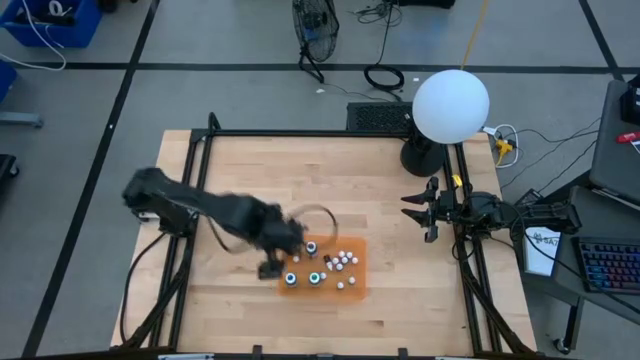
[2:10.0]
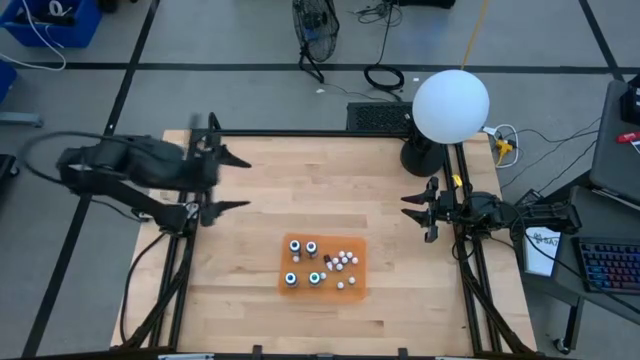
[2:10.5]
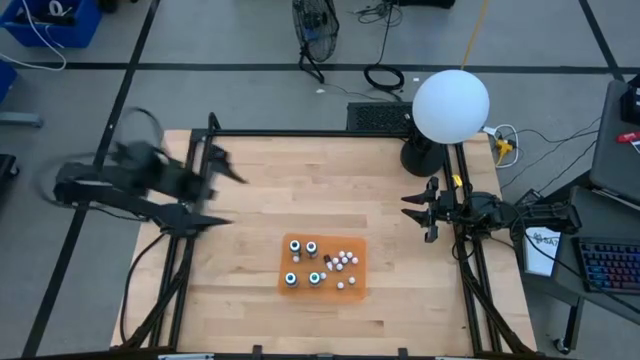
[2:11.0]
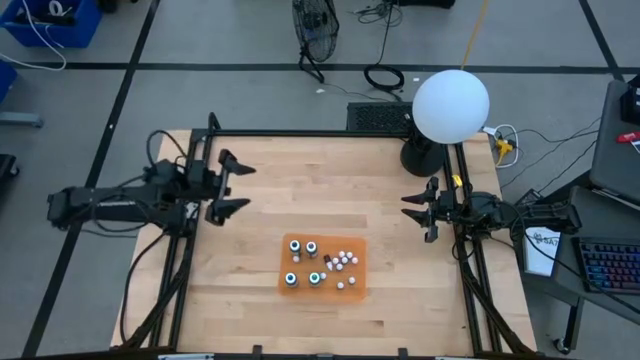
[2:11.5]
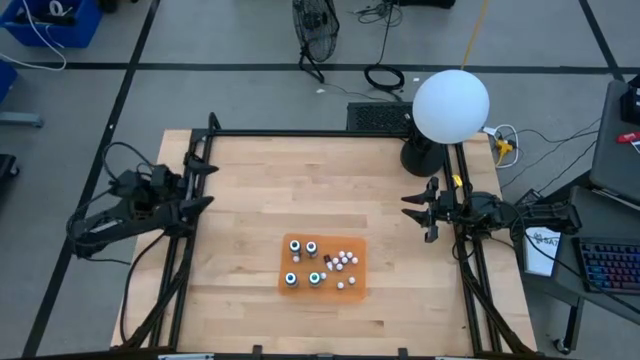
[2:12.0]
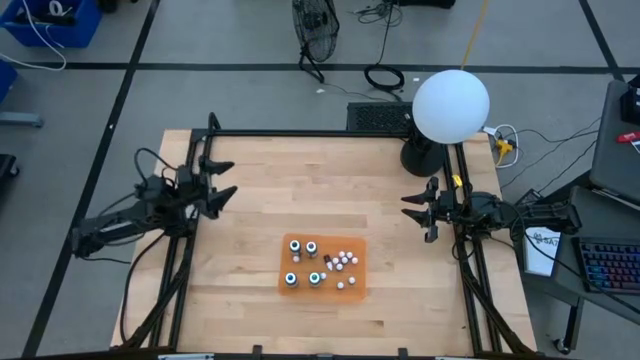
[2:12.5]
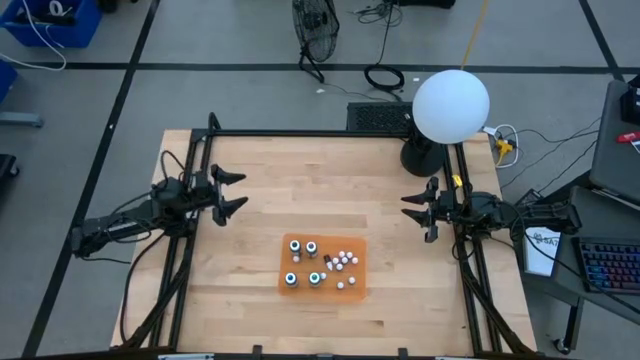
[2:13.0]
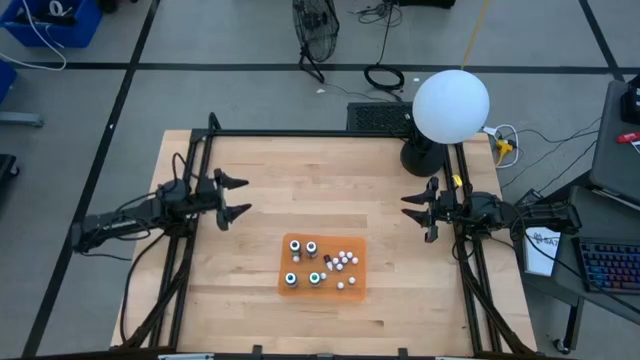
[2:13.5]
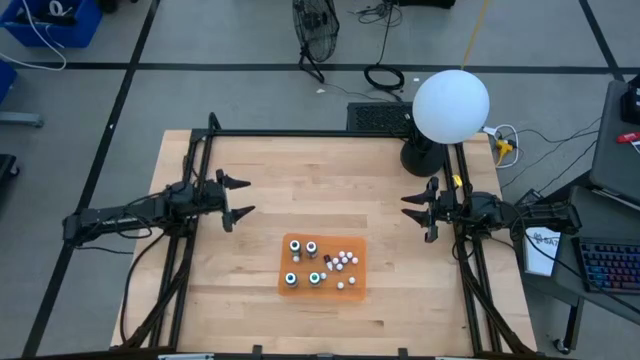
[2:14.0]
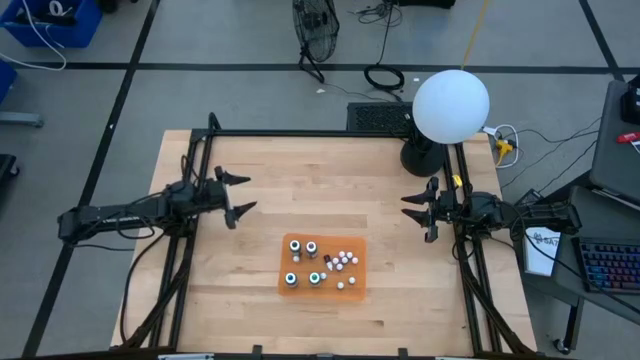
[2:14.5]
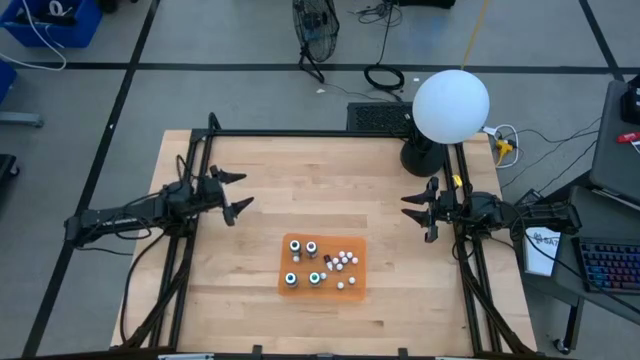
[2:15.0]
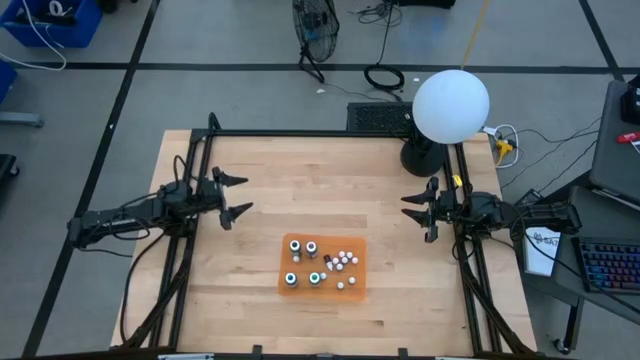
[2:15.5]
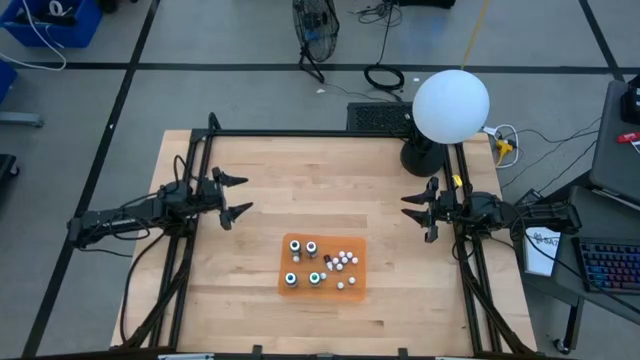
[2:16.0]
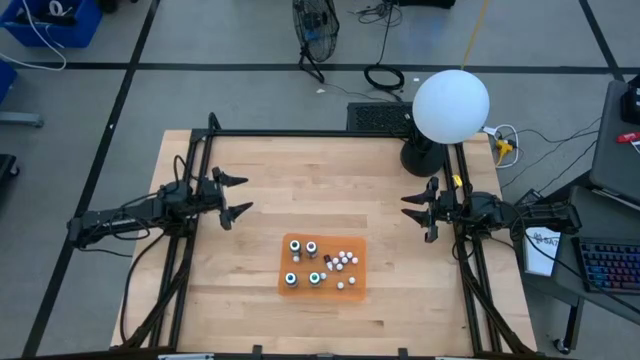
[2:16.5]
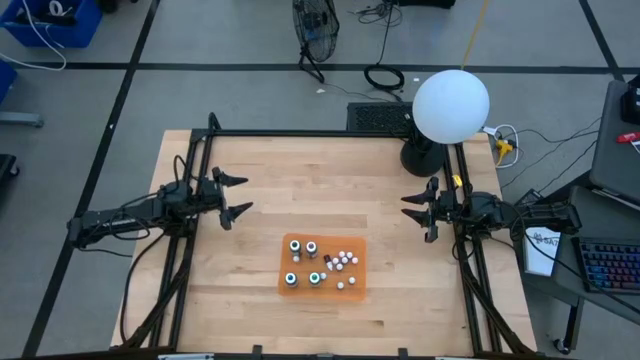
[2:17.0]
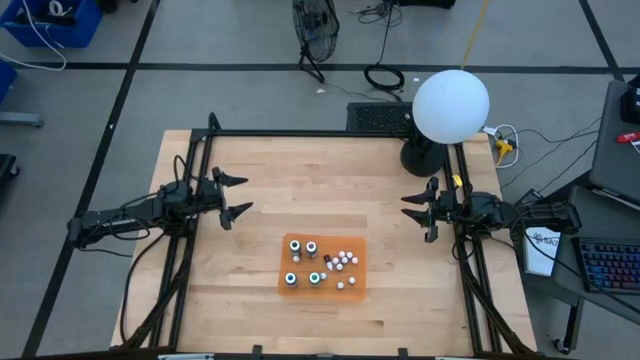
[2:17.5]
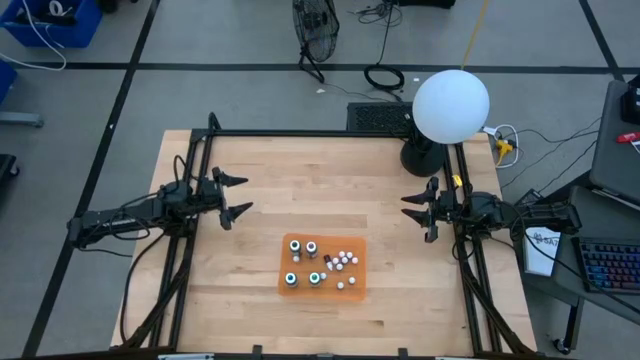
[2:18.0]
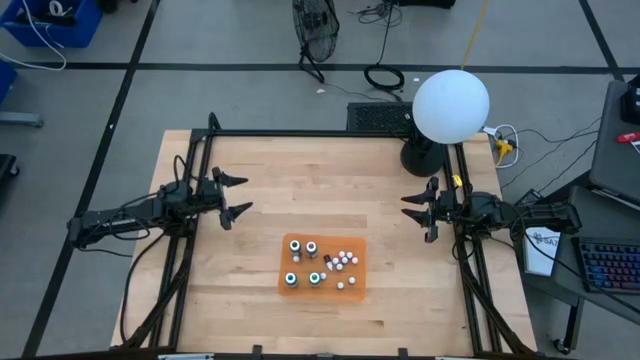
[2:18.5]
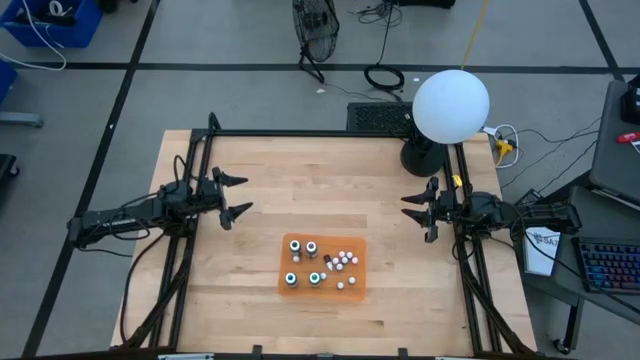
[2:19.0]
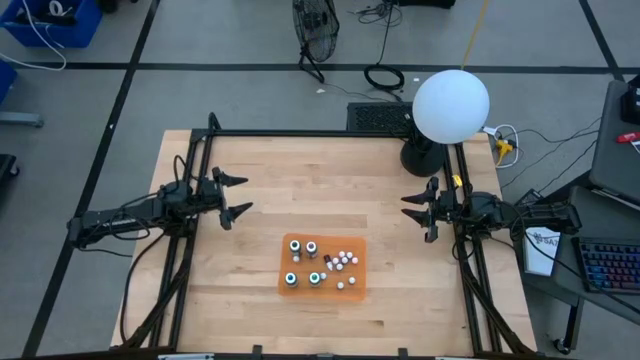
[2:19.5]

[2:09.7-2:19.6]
Task: Pick & Place food coloring
Return to Home Position

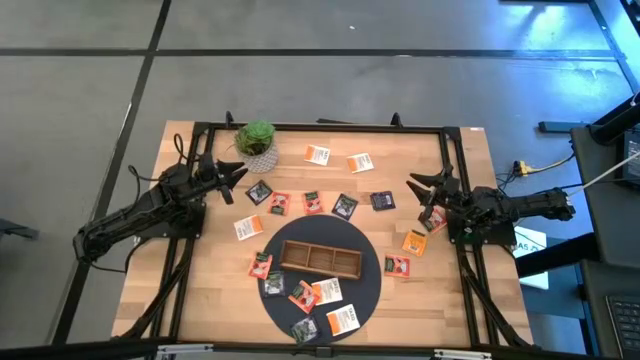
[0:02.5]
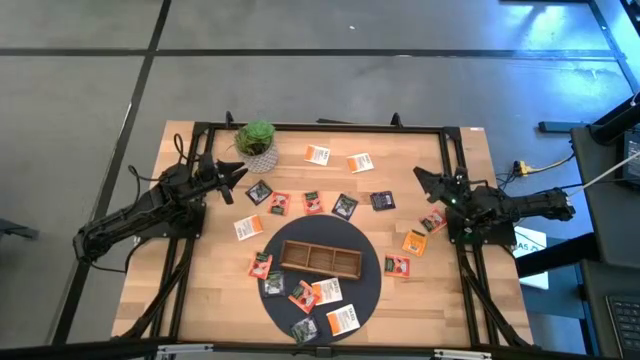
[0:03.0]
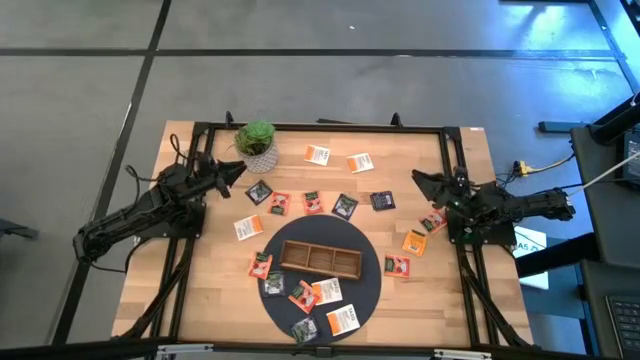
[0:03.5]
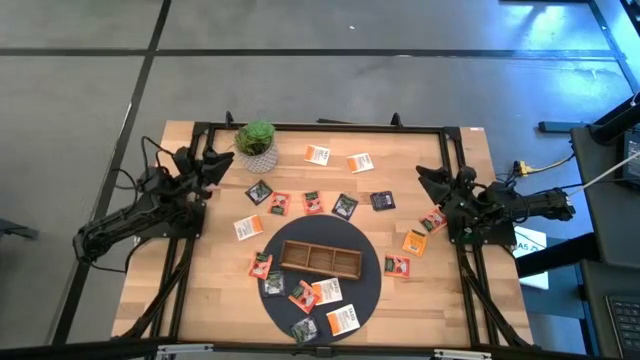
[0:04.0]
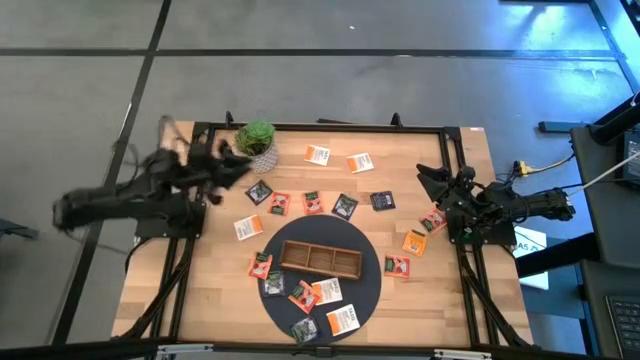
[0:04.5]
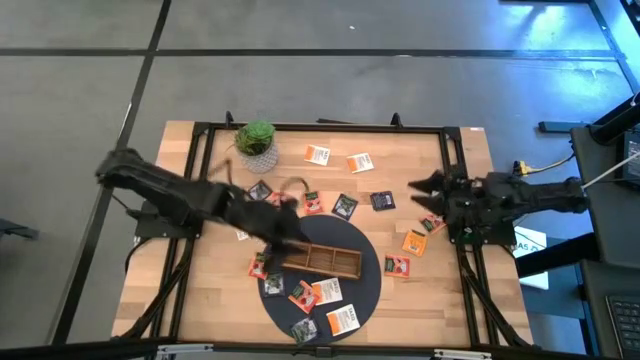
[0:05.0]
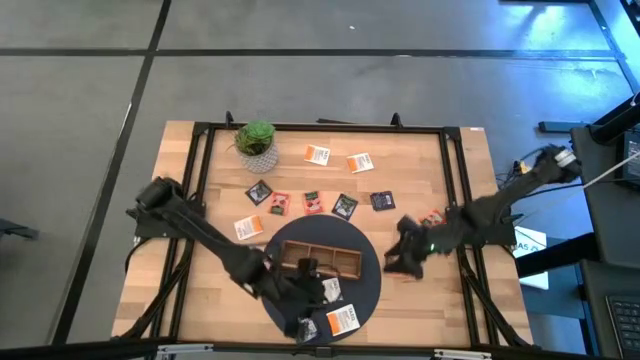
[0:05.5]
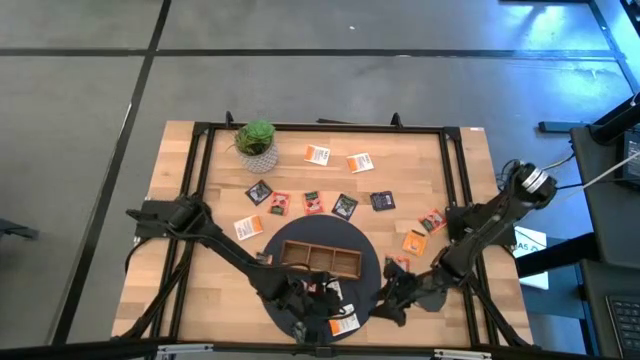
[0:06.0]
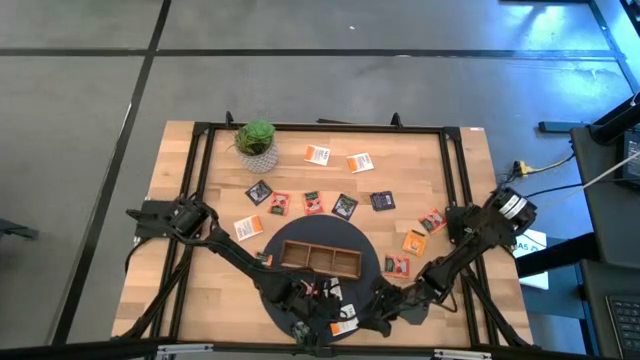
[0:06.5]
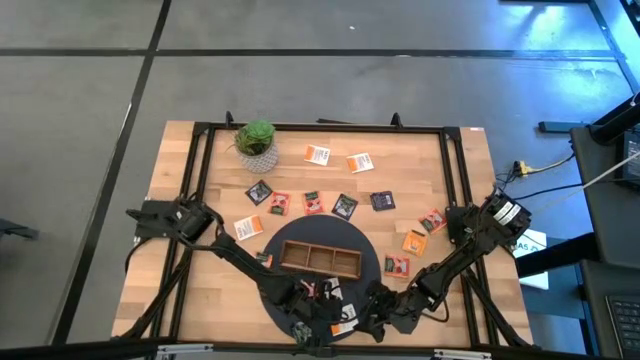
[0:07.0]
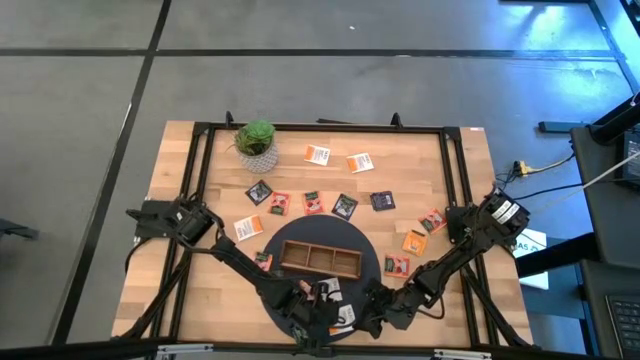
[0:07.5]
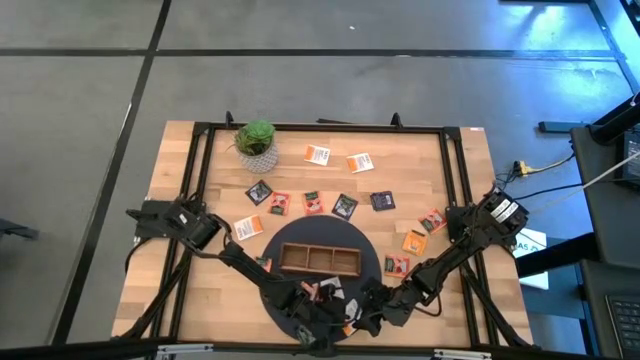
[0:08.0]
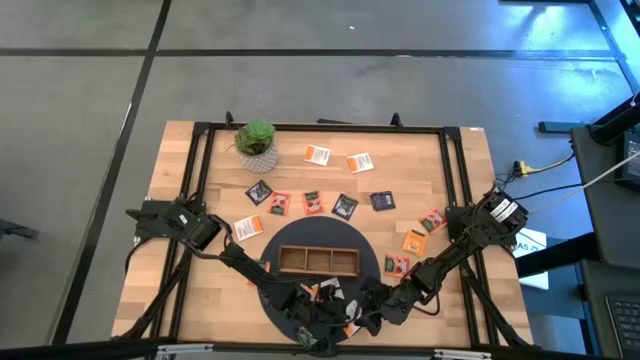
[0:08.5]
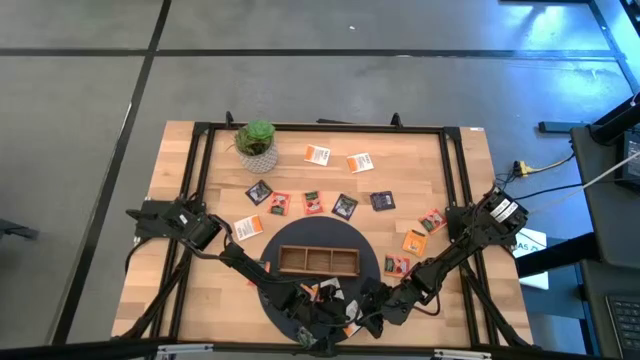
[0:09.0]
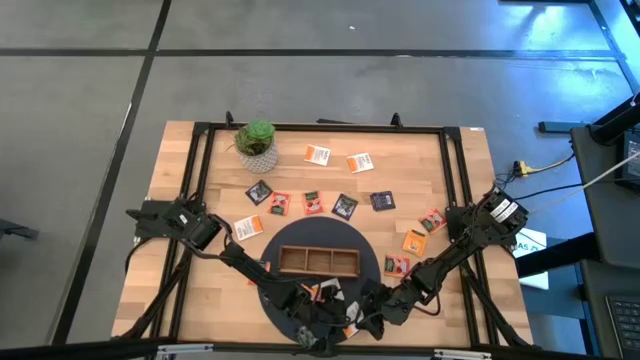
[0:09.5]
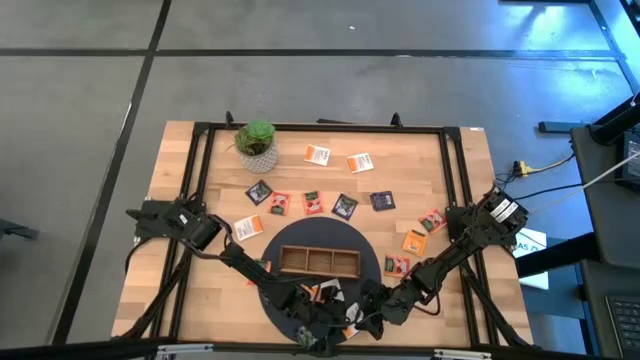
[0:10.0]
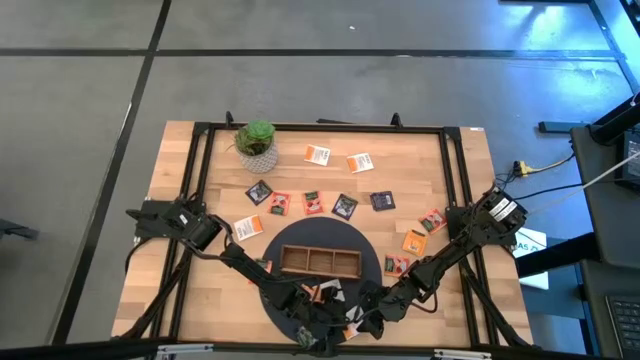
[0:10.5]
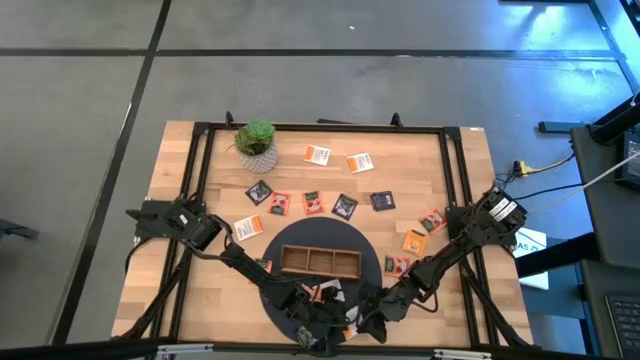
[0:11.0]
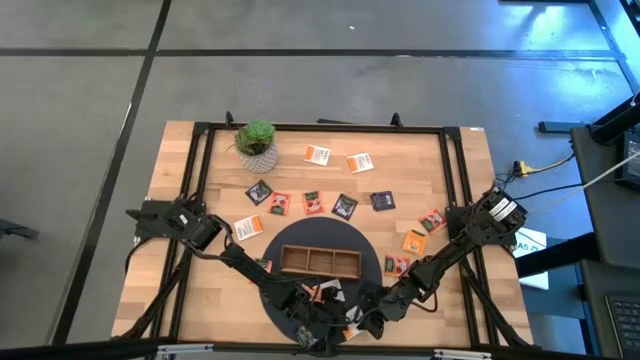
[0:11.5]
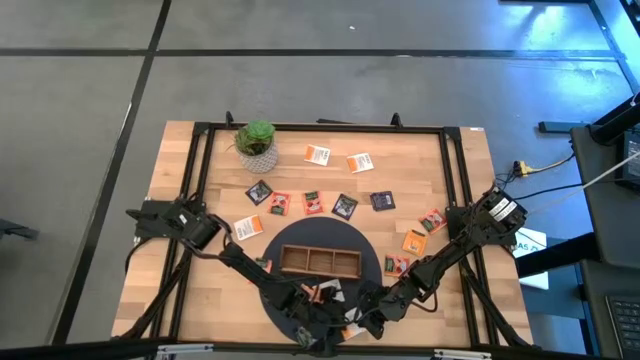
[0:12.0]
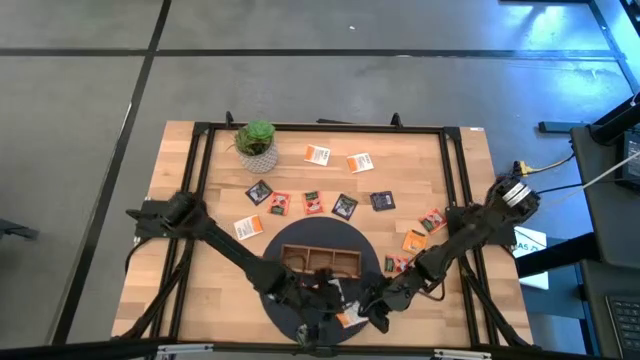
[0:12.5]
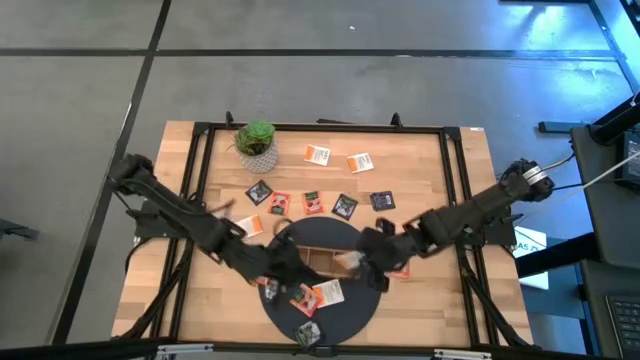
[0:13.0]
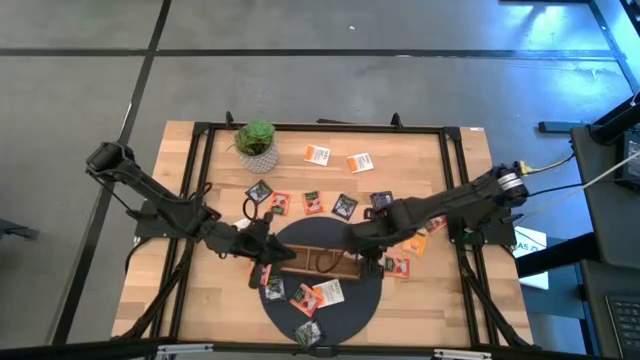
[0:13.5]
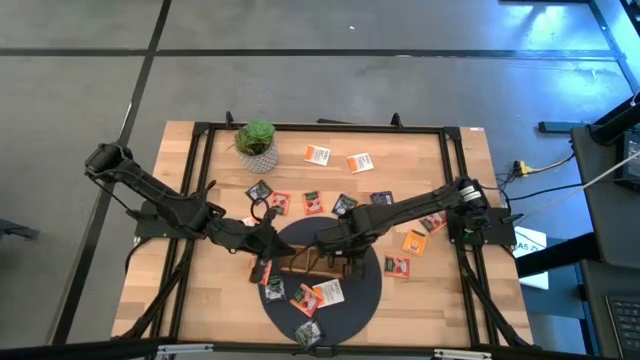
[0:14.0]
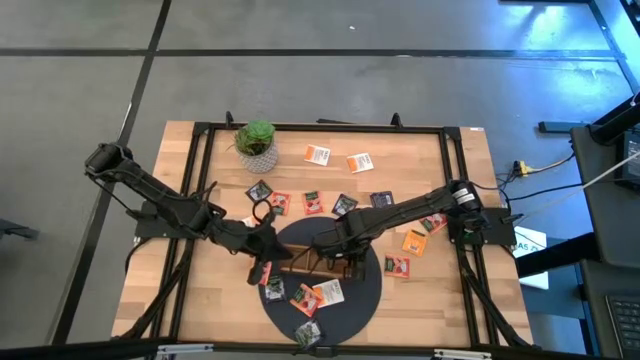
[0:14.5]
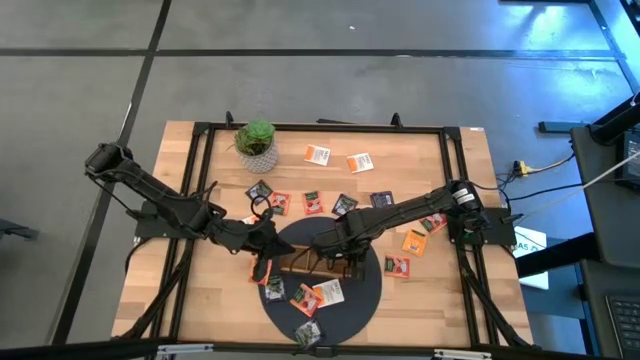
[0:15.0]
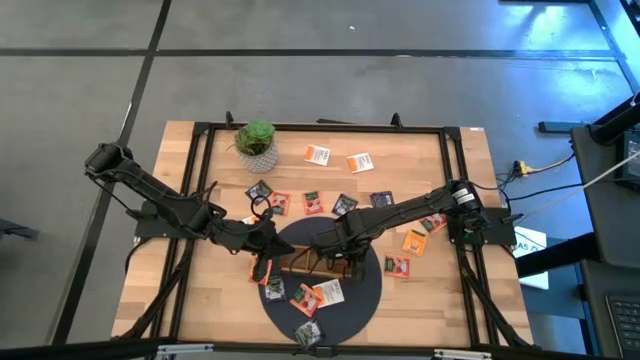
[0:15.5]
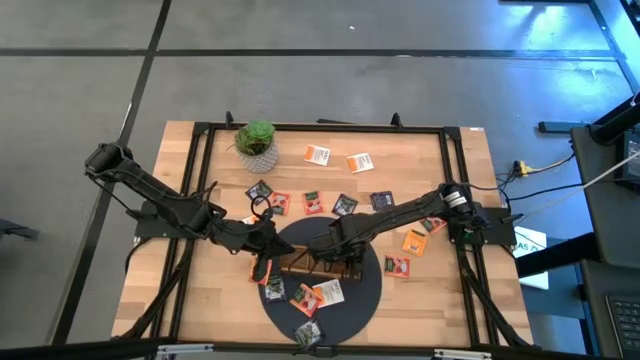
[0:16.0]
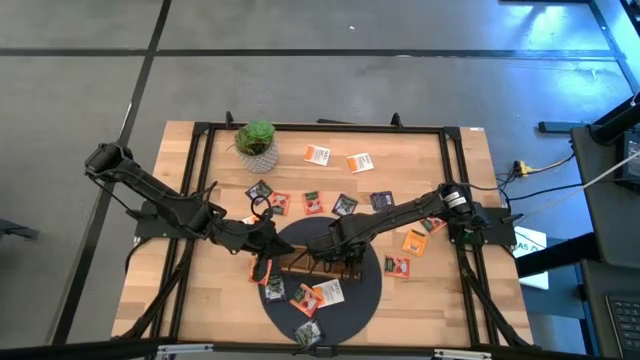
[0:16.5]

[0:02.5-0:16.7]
Task: Pick & Place Tea
Put the white tea bag into the right slot of the wooden organizer
